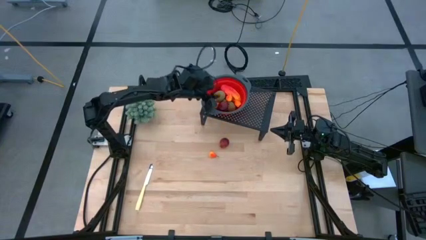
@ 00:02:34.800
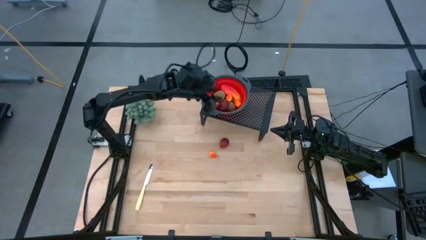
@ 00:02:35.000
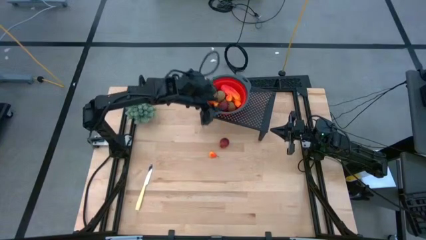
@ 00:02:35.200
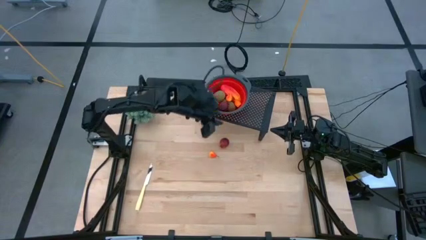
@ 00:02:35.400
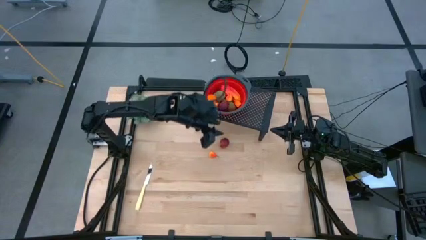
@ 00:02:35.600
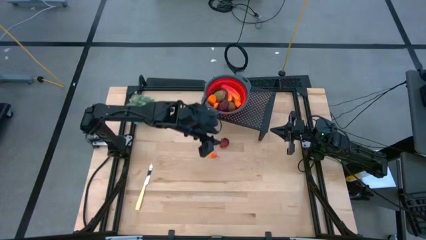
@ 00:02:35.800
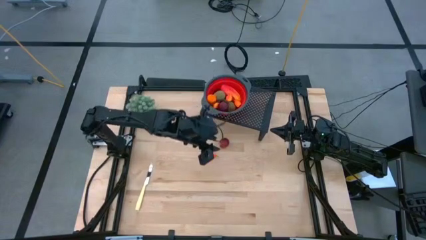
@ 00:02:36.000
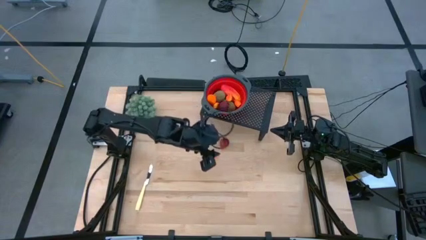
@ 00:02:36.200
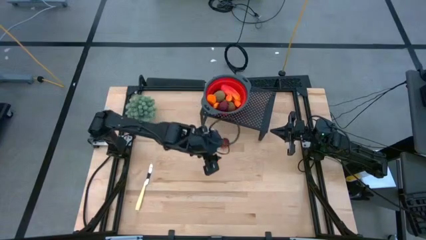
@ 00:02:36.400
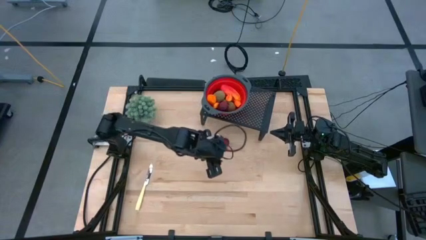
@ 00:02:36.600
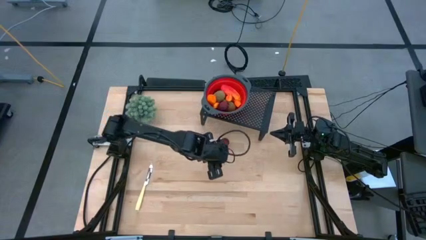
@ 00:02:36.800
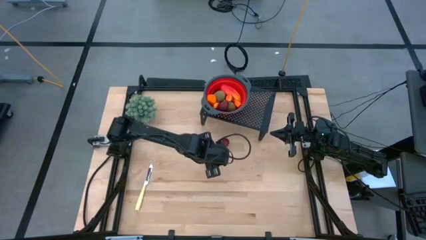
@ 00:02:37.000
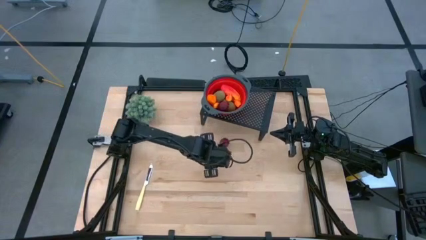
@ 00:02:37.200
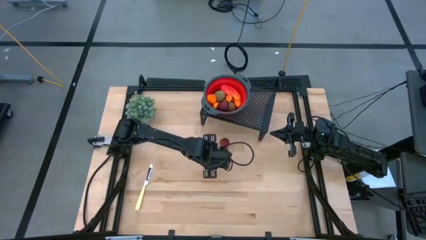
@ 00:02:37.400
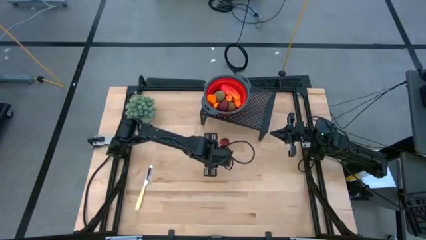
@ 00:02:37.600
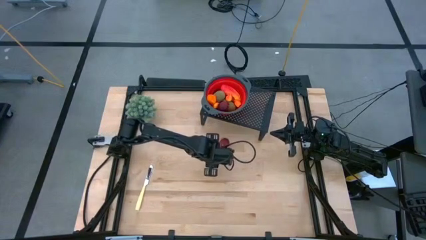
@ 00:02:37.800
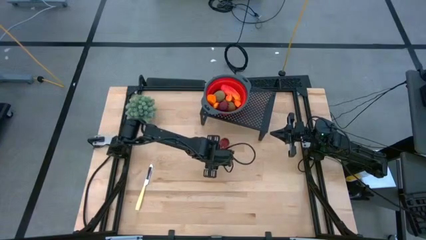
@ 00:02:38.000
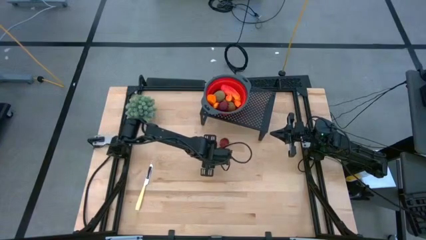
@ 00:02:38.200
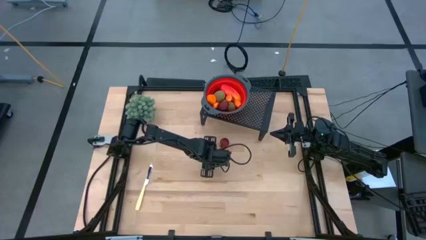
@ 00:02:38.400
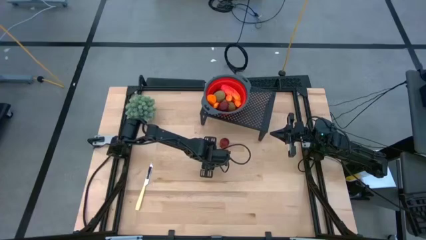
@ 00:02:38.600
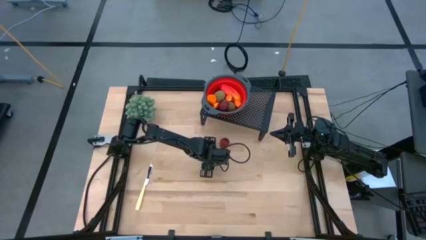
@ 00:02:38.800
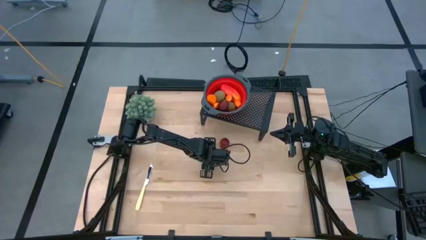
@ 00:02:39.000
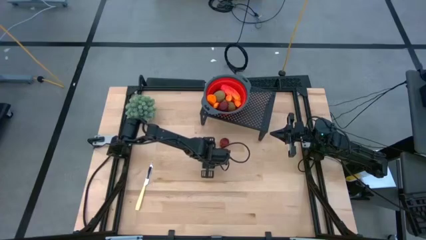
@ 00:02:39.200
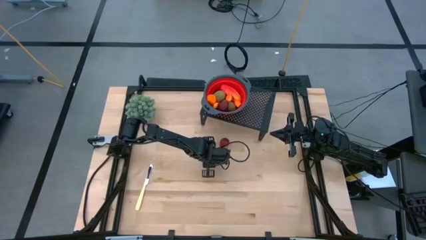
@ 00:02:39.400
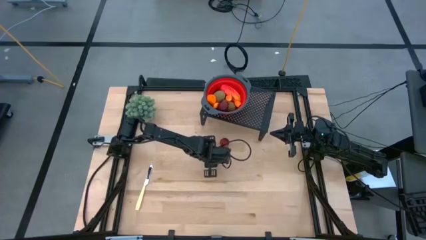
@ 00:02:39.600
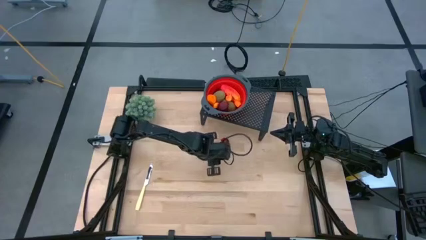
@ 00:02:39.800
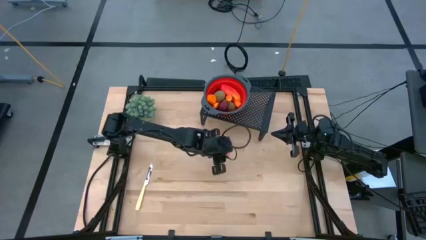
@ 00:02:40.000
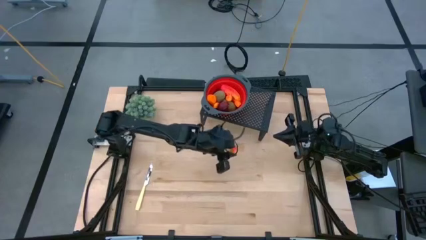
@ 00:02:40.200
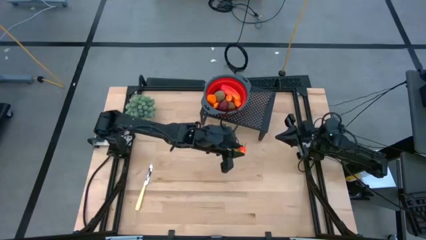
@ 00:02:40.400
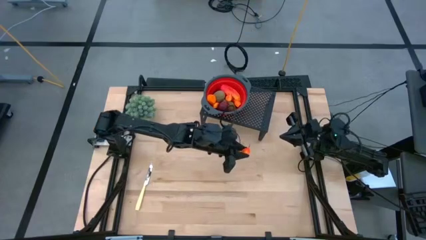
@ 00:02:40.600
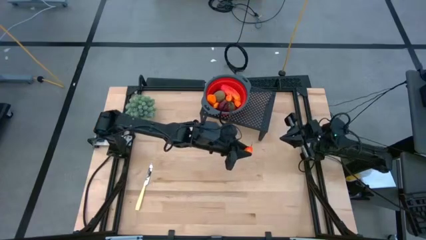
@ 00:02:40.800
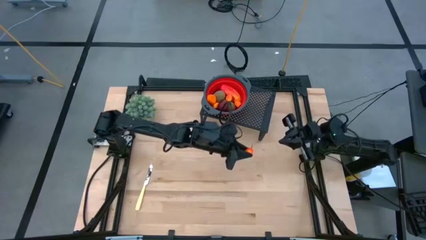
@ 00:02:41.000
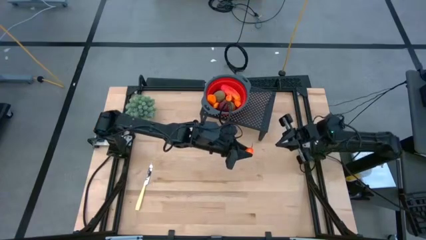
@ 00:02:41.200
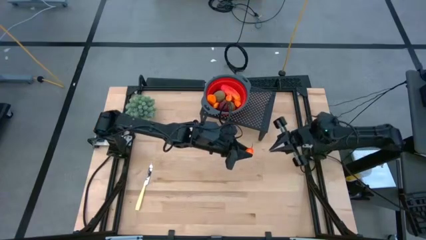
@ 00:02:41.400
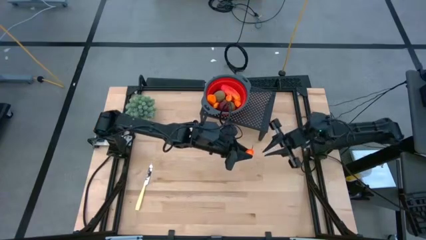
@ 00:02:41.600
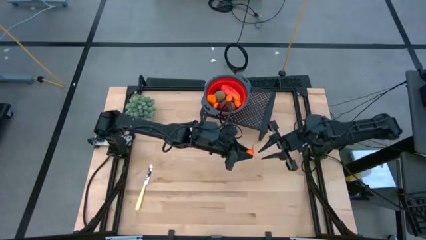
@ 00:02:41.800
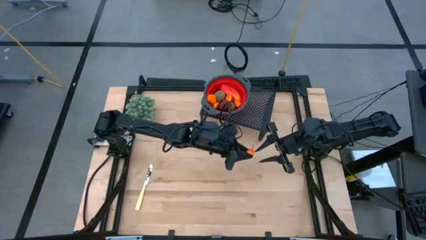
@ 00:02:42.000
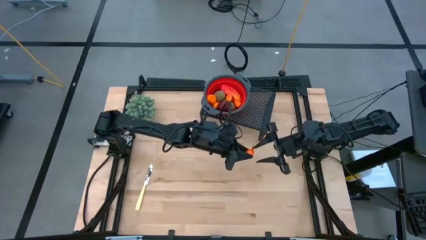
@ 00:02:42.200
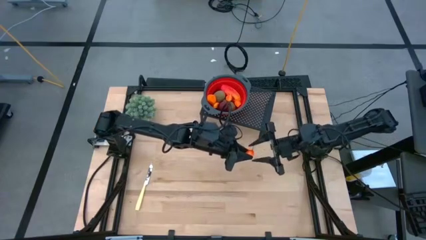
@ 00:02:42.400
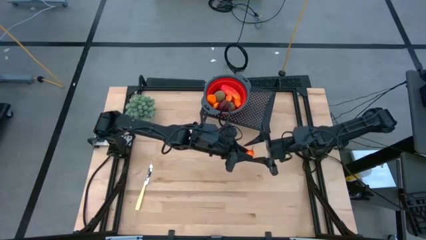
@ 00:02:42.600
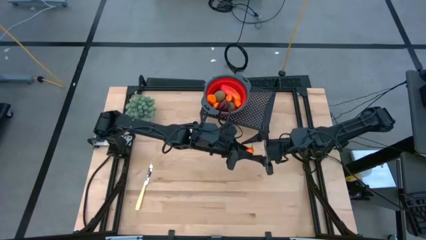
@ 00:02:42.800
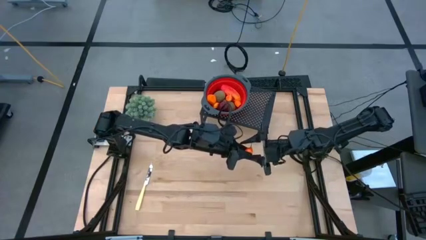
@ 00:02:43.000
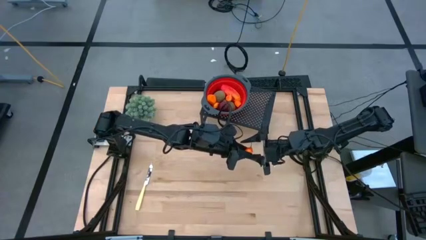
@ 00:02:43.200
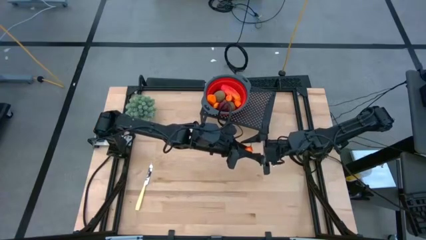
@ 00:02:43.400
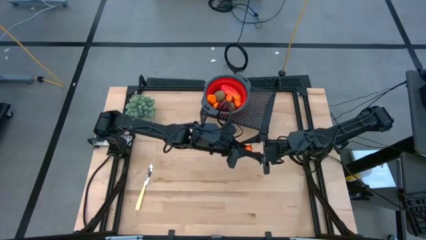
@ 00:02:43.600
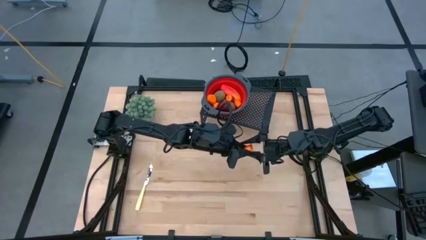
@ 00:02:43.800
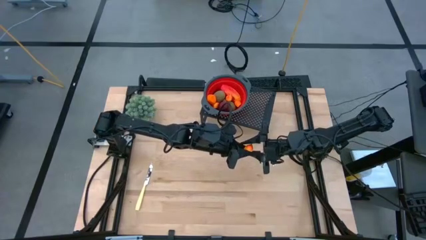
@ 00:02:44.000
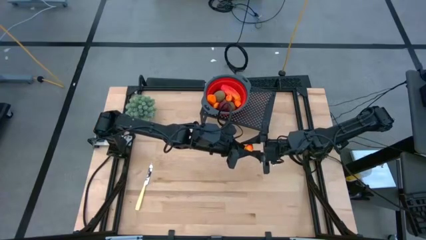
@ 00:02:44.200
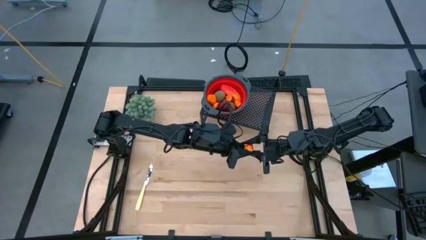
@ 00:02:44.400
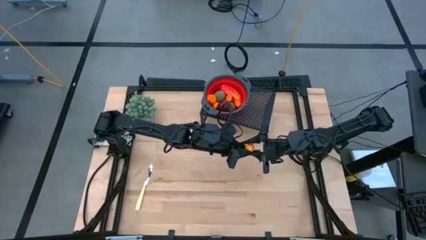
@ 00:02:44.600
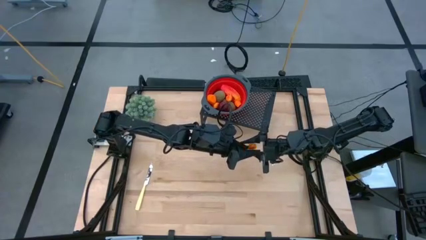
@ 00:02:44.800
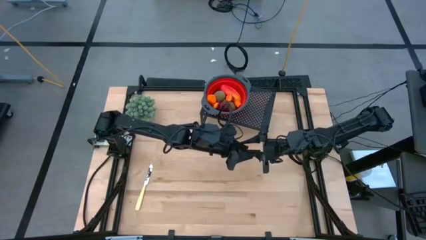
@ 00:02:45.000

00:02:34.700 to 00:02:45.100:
Task: Pick & Place Fruit
Put the pear into the red strainer bowl on the shelf
